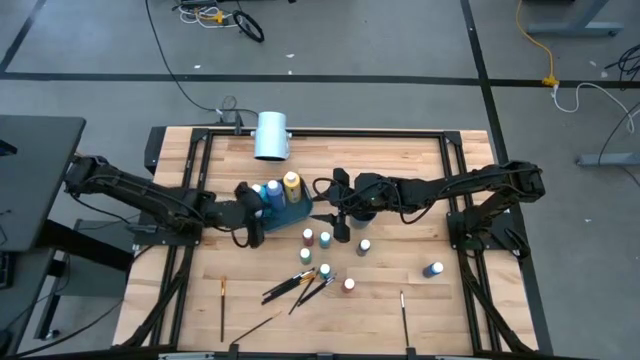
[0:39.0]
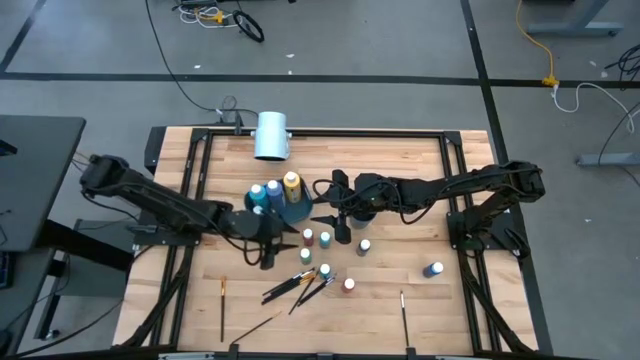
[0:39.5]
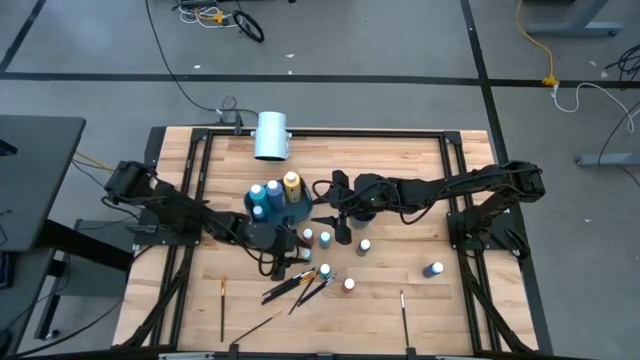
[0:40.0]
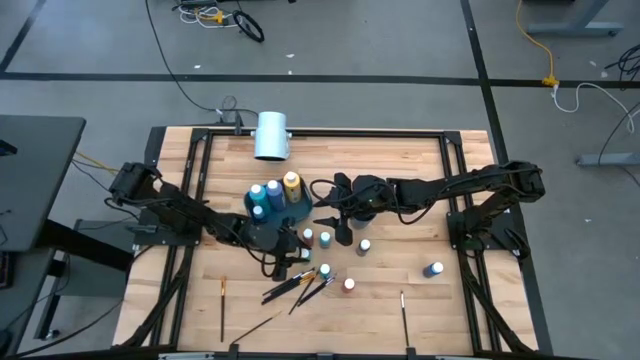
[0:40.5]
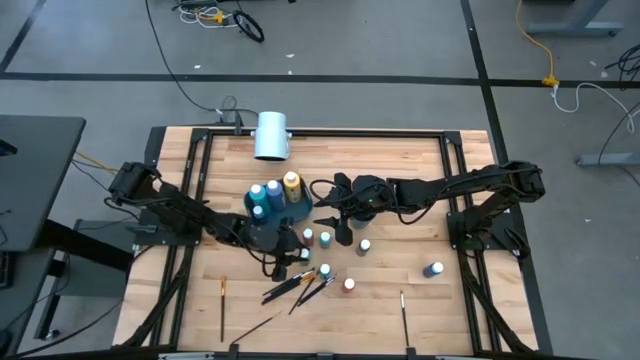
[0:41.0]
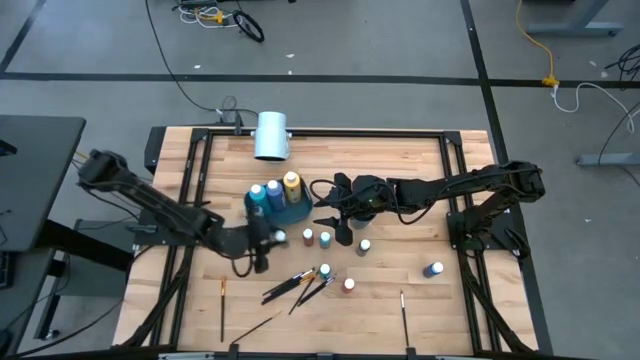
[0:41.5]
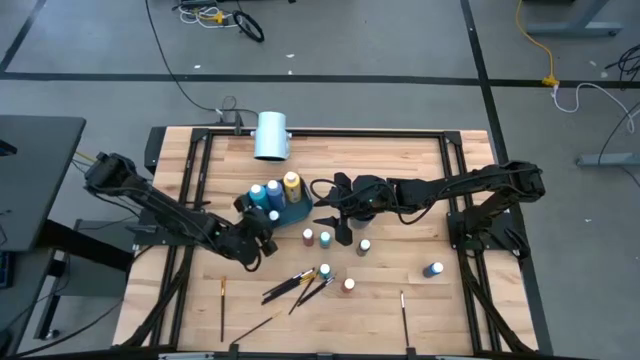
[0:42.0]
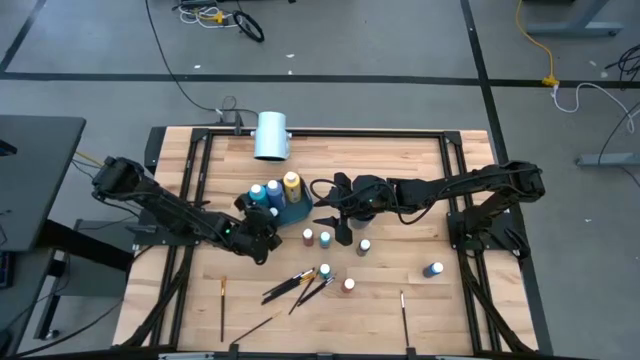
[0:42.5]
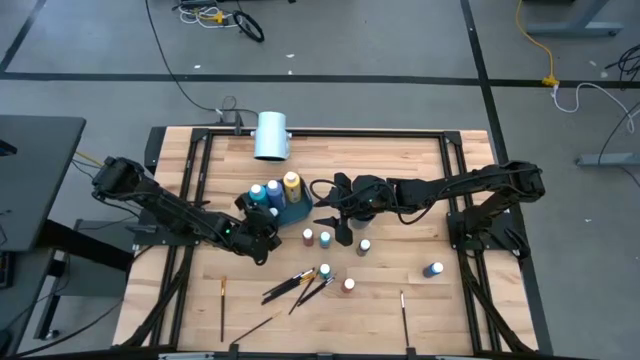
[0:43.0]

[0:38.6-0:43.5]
Task: Pick & Place Paint Supplies
Put the small light green paint bottle into the blue bin

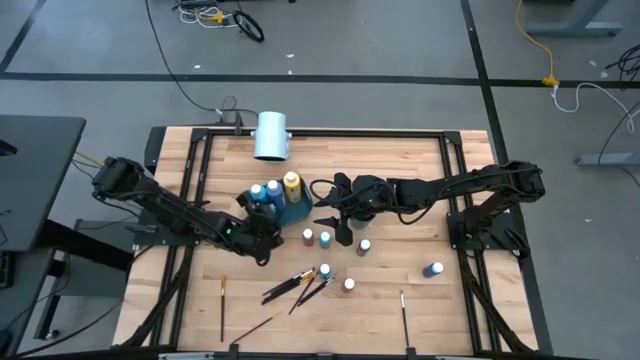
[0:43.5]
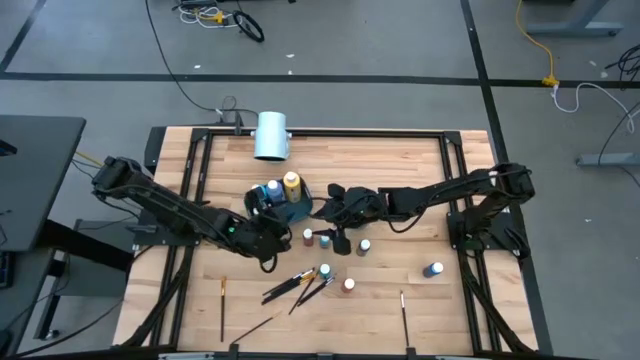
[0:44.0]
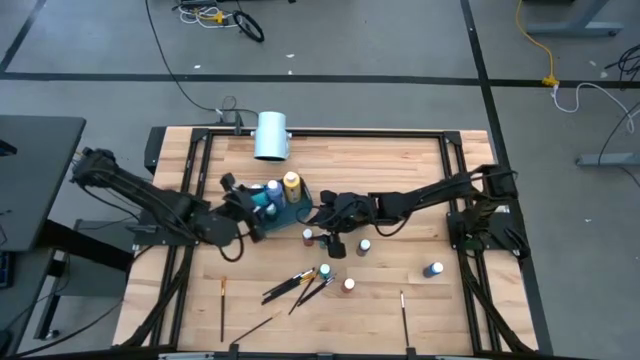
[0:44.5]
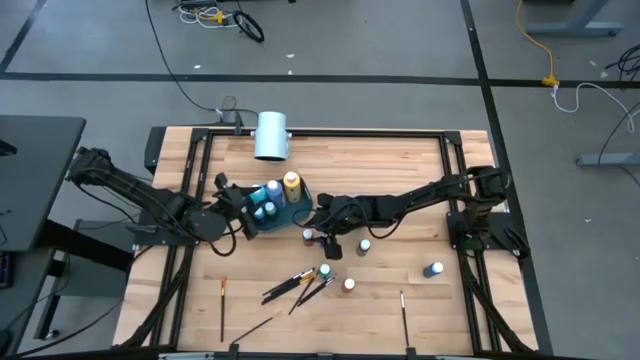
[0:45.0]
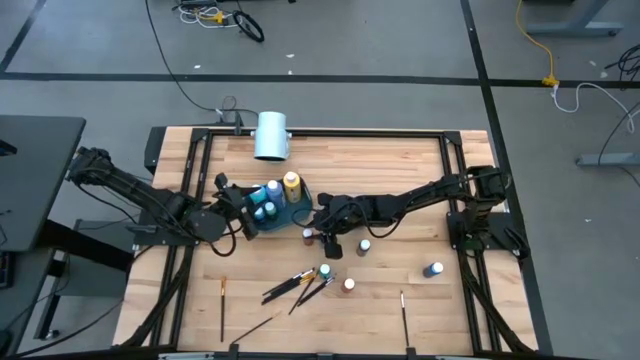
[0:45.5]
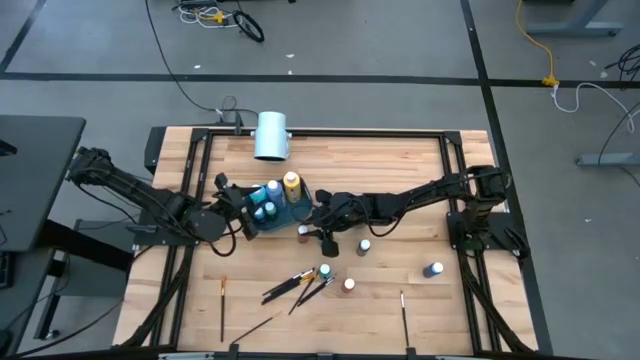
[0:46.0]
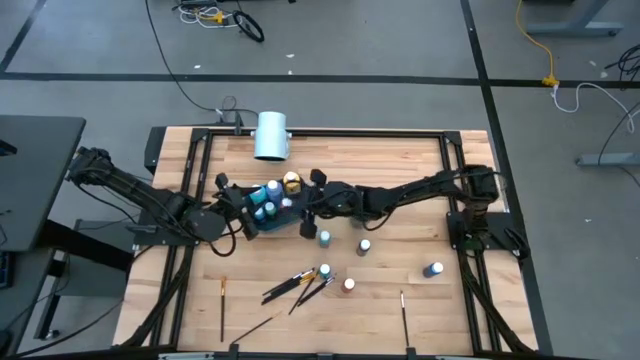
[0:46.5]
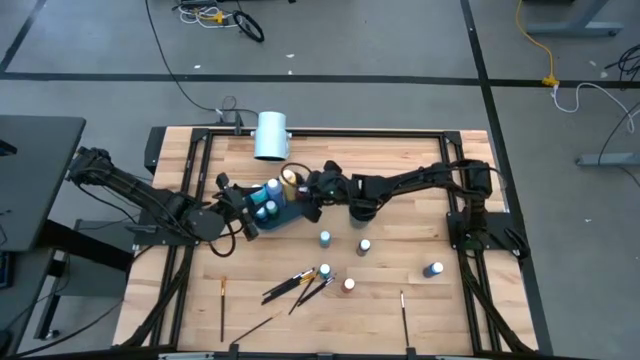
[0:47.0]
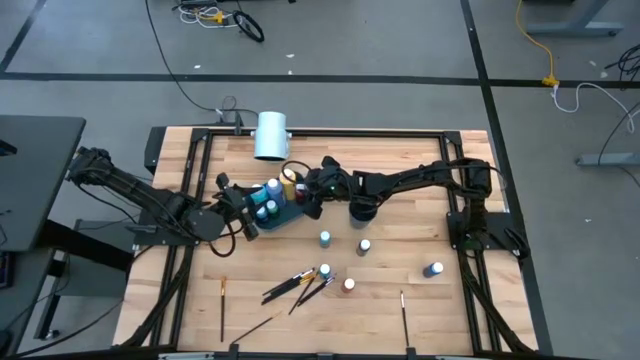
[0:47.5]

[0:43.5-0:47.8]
Put the small red paint bottle into the blue bin

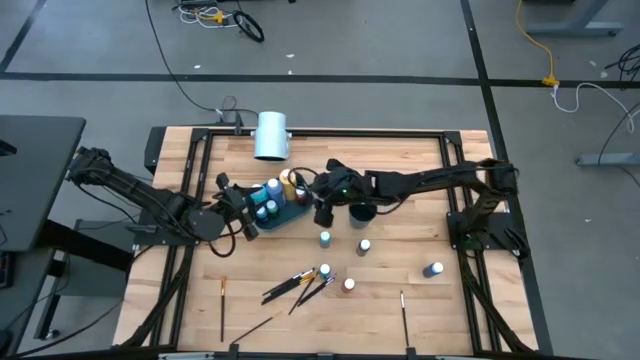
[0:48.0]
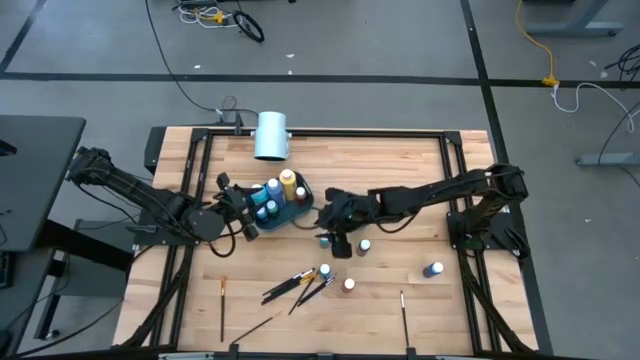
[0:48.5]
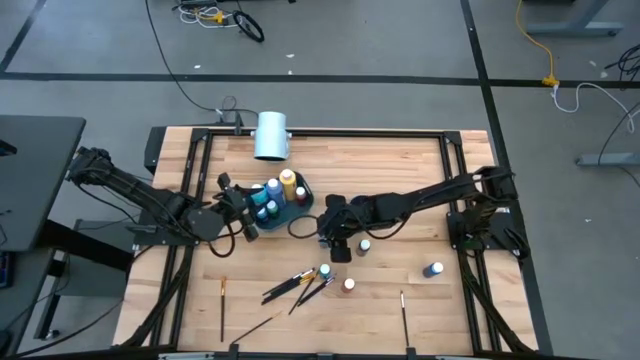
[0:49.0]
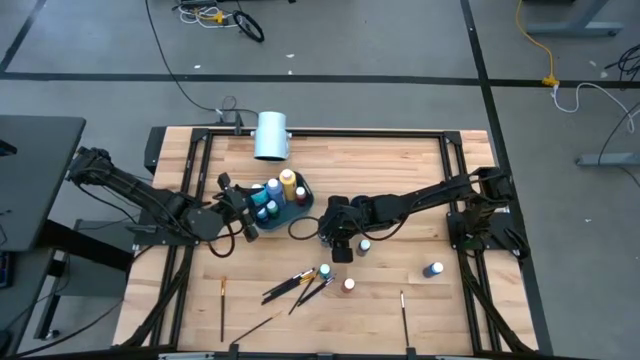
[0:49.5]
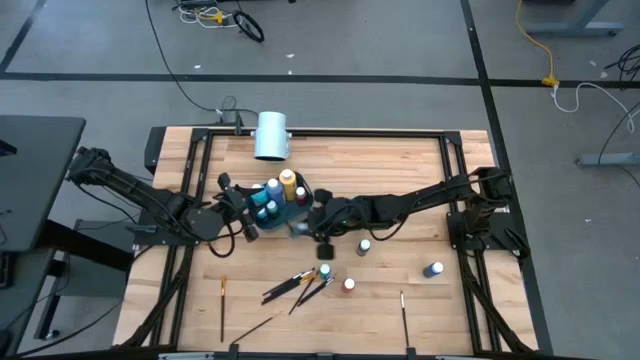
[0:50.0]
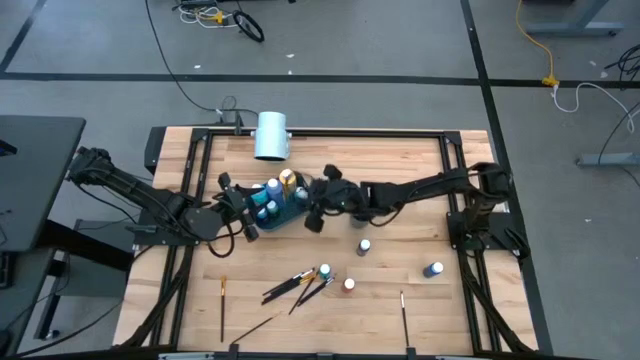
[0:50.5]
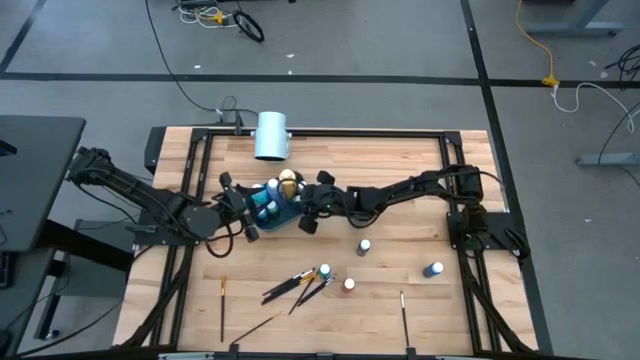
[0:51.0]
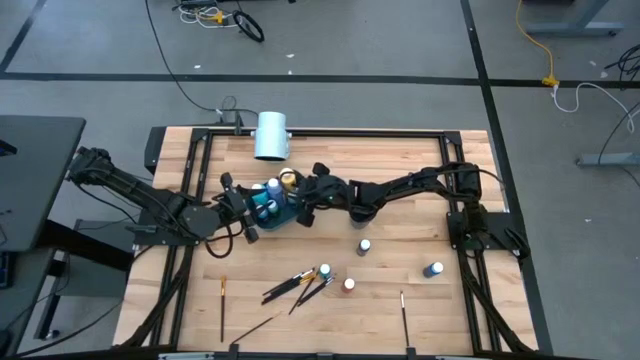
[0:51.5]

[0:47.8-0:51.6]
Put the small light blue paint bottle into the blue bin

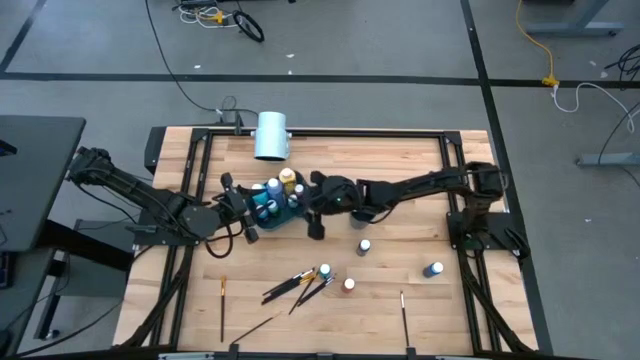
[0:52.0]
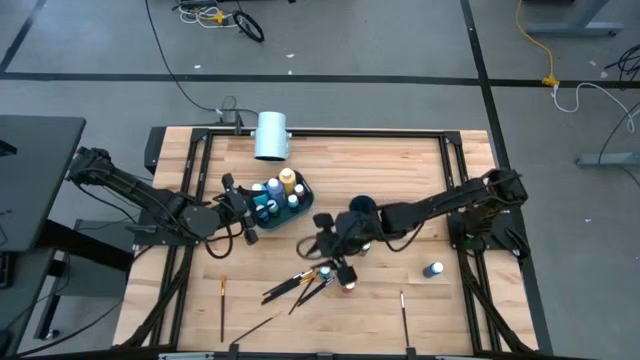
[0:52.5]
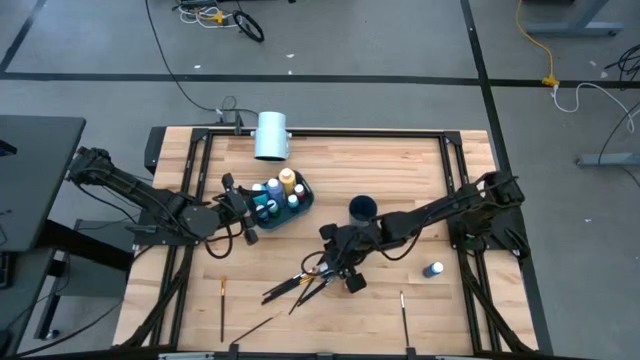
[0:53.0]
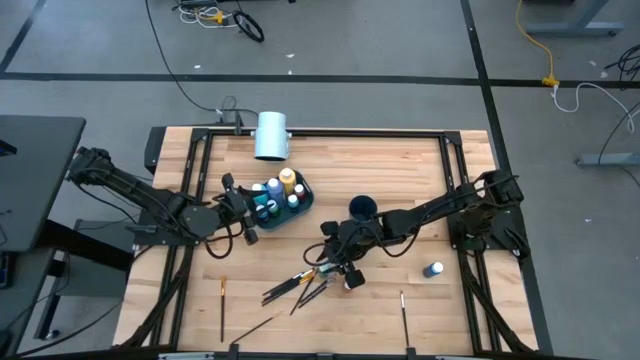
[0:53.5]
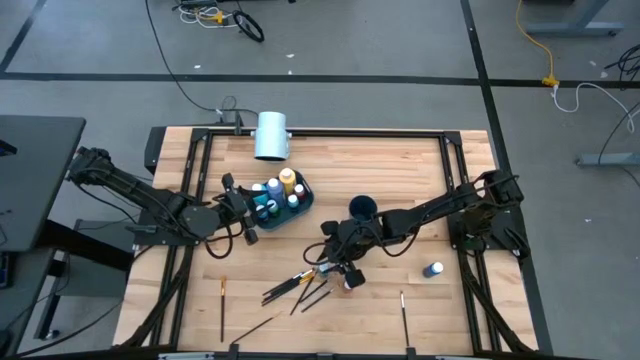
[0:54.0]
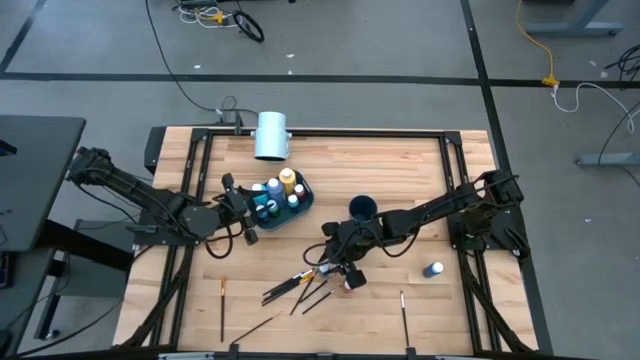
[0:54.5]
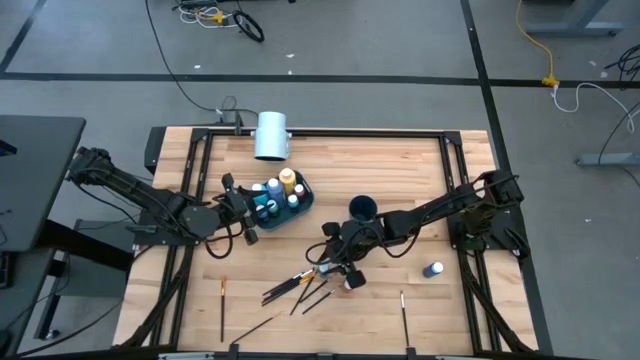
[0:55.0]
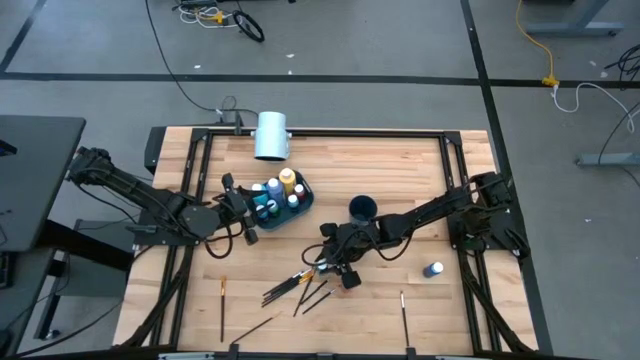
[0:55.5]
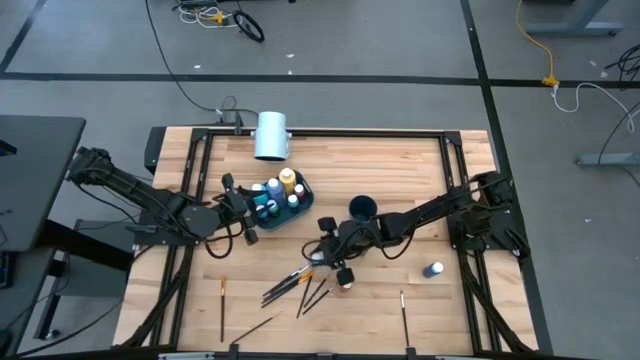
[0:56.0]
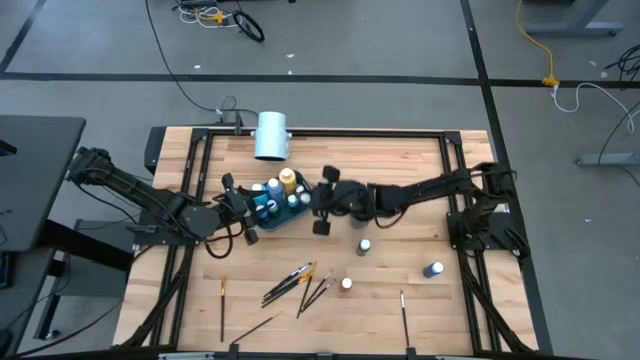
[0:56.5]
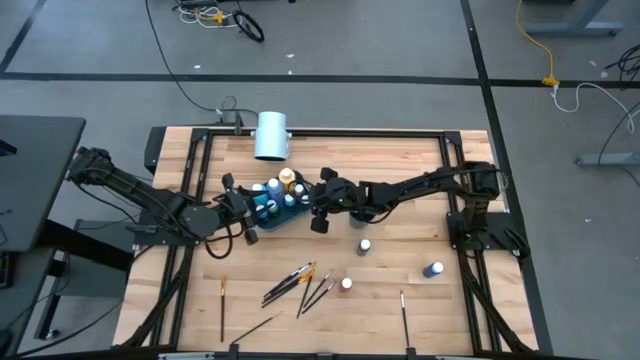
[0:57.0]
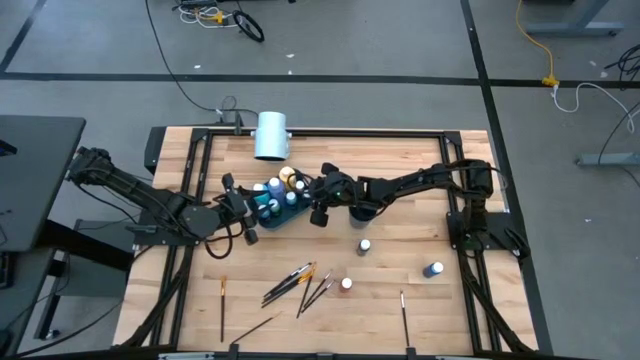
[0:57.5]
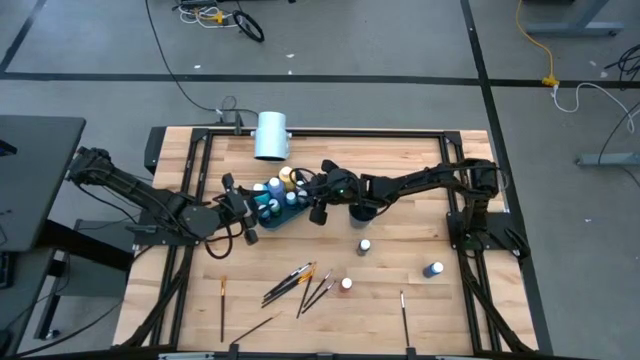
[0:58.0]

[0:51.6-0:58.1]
Put the small green paint bottle into the blue bin

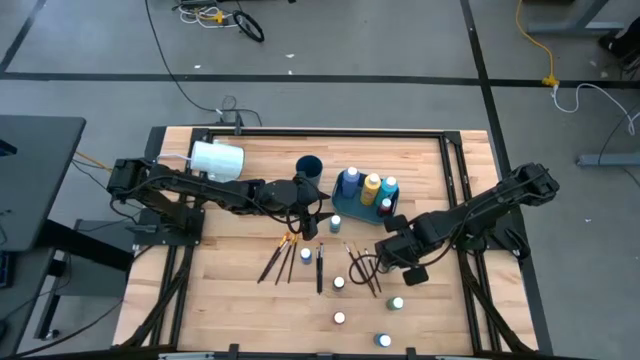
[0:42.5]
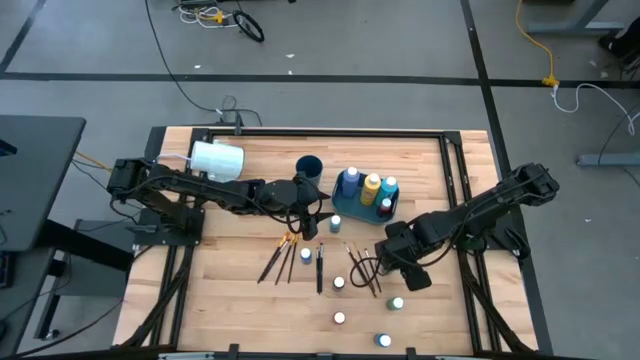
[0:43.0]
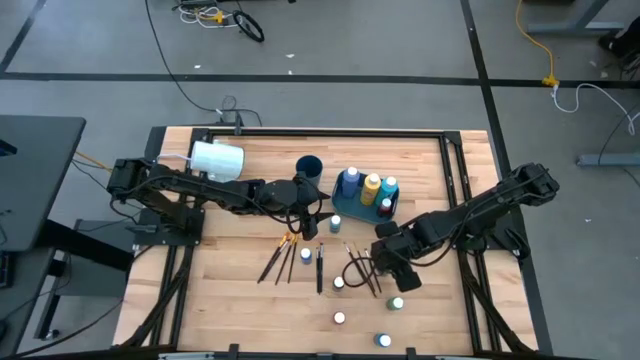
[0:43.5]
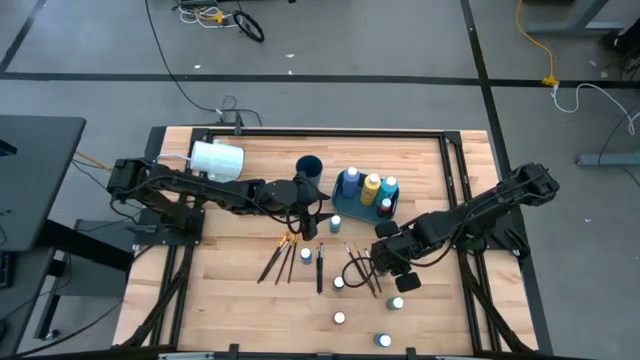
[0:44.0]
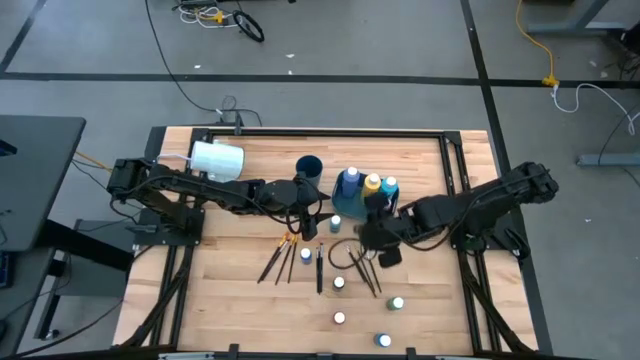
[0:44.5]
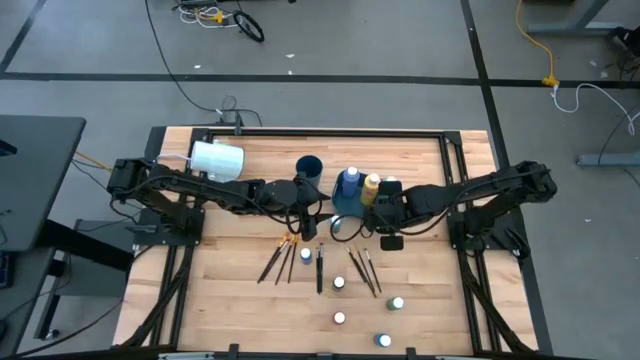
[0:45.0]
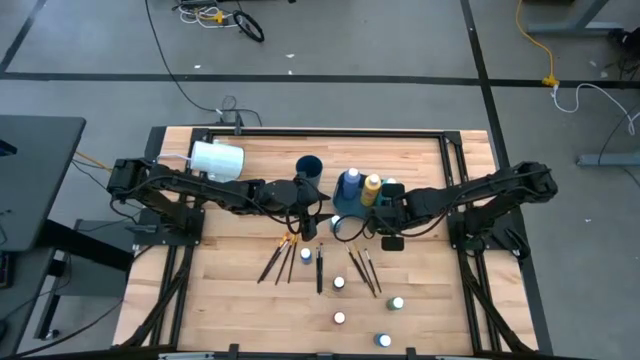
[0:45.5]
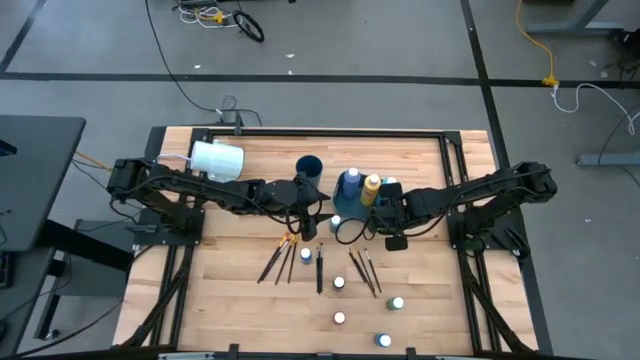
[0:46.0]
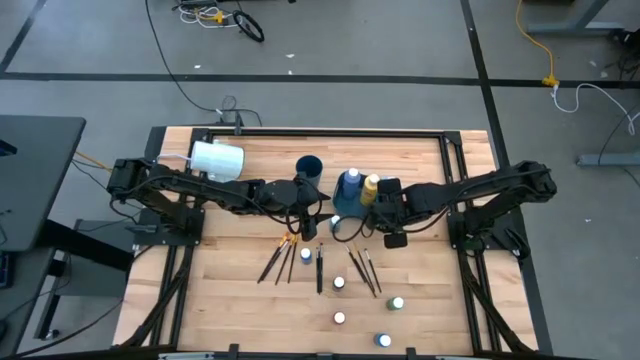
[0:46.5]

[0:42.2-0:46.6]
Task: Pick & Place Paint Supplies
Put the small light blue paint bottle into the blue bin
